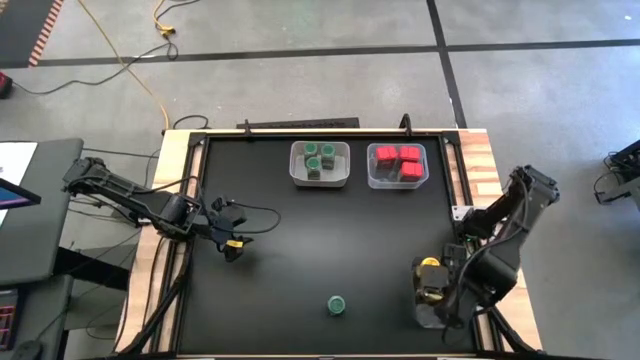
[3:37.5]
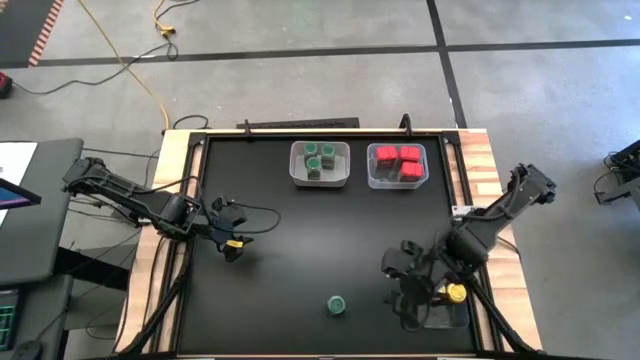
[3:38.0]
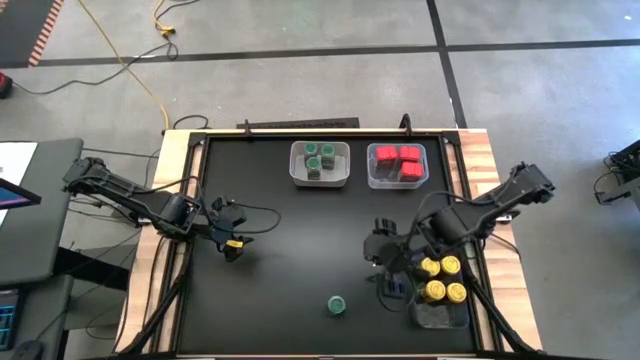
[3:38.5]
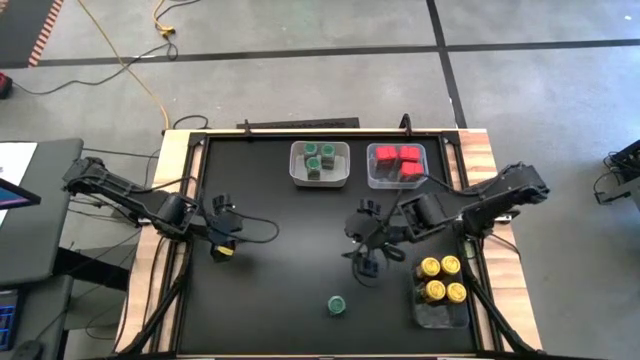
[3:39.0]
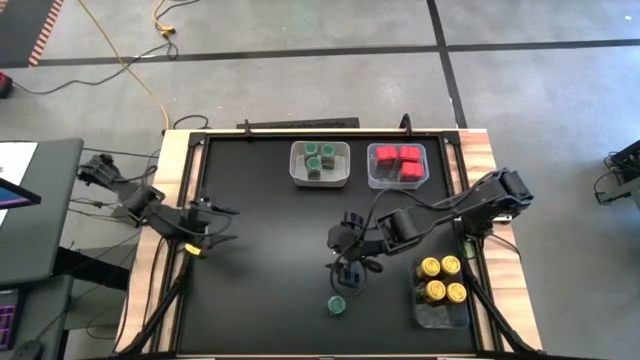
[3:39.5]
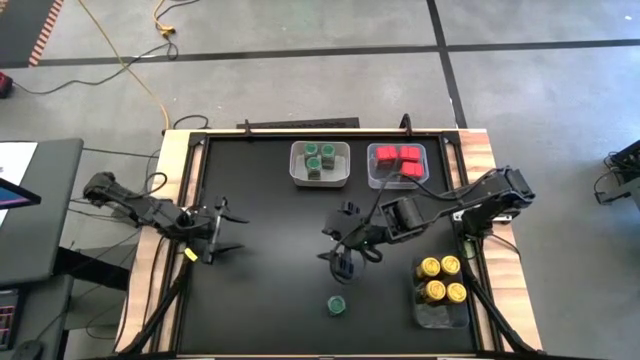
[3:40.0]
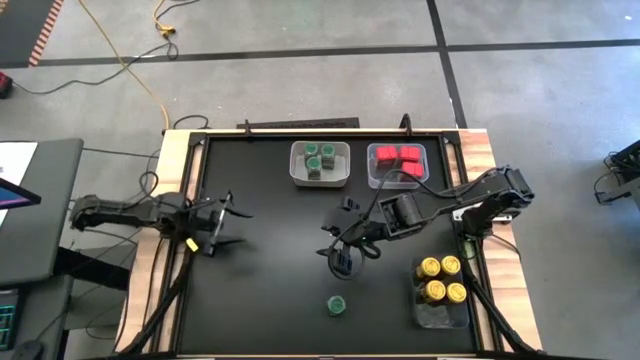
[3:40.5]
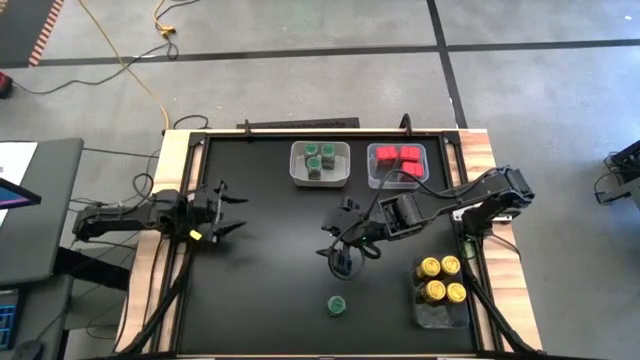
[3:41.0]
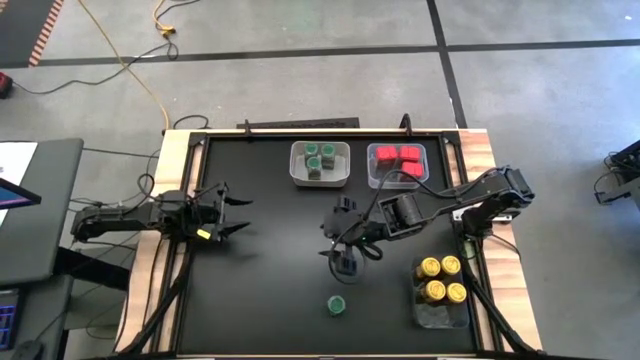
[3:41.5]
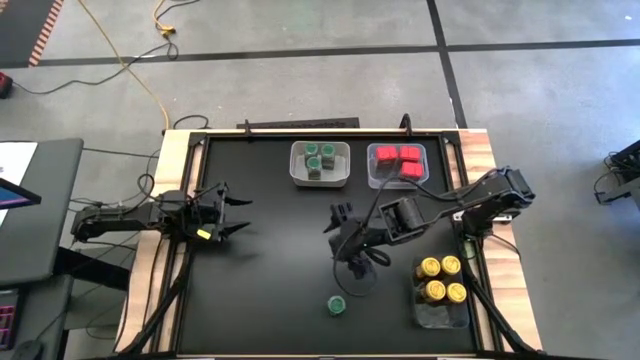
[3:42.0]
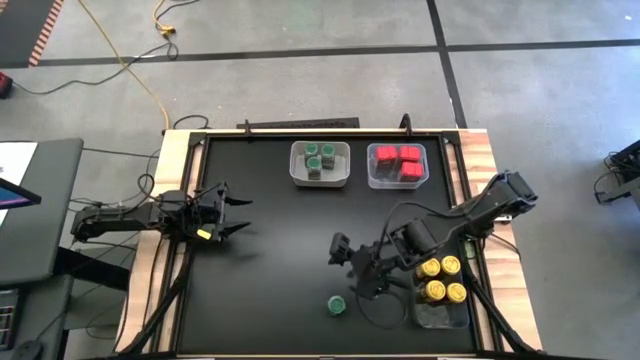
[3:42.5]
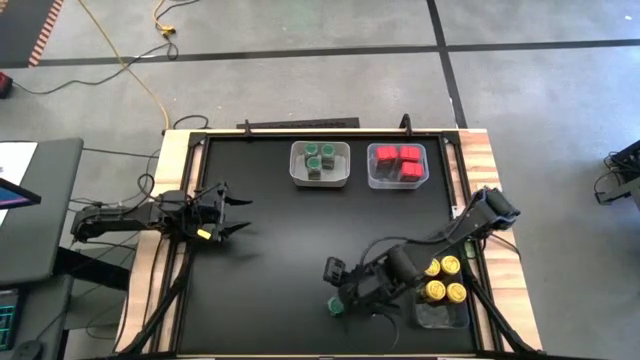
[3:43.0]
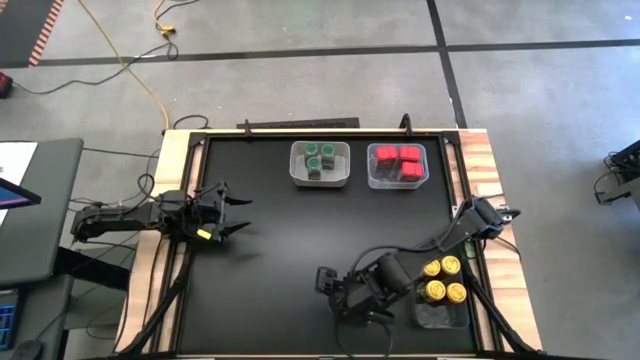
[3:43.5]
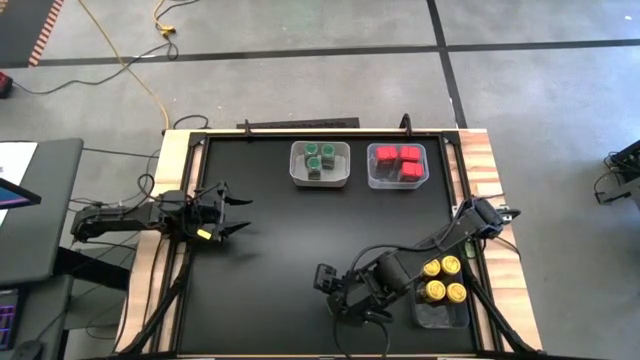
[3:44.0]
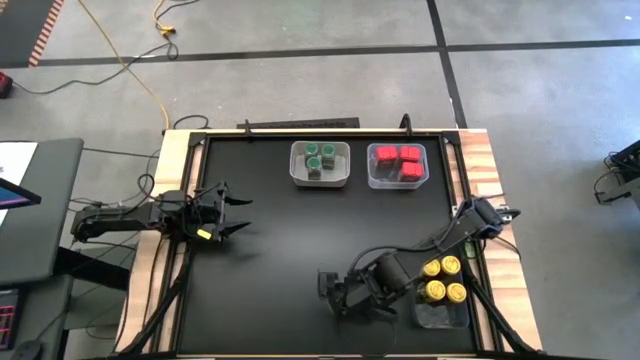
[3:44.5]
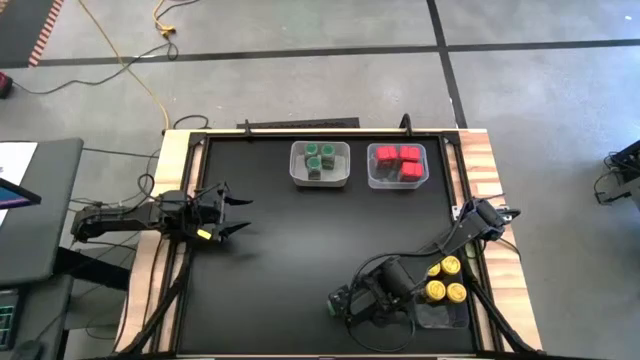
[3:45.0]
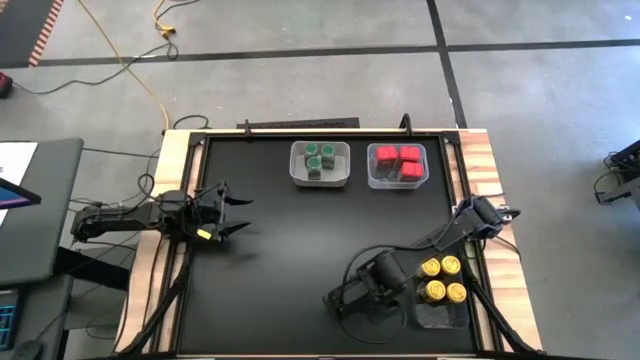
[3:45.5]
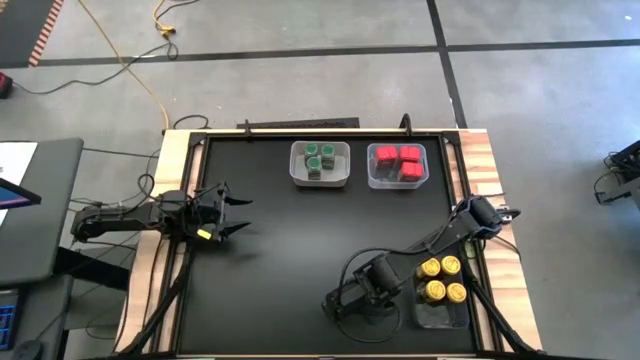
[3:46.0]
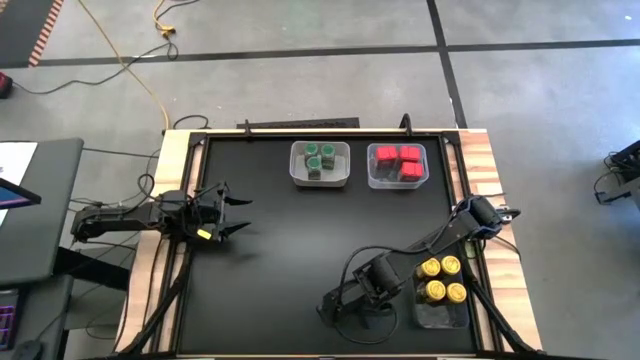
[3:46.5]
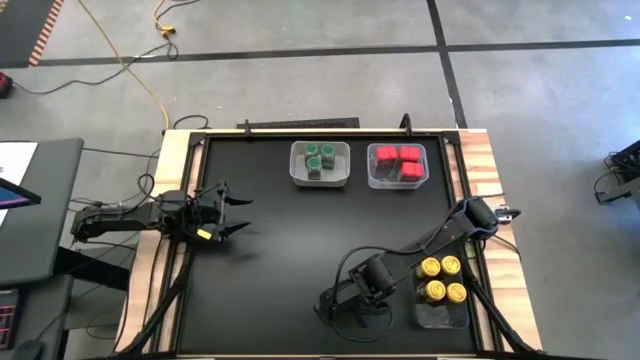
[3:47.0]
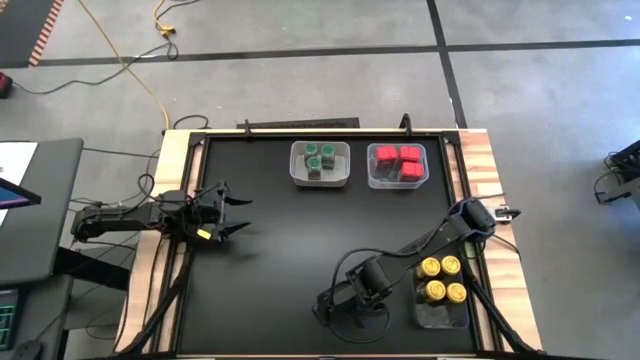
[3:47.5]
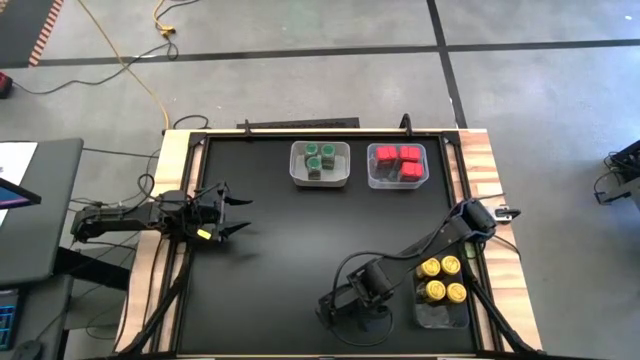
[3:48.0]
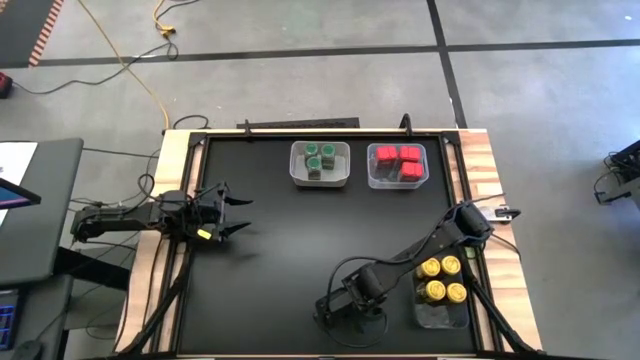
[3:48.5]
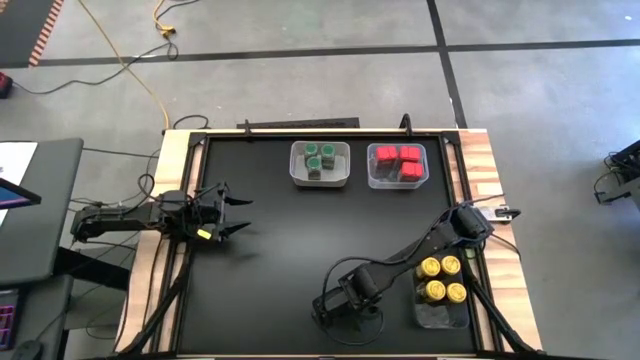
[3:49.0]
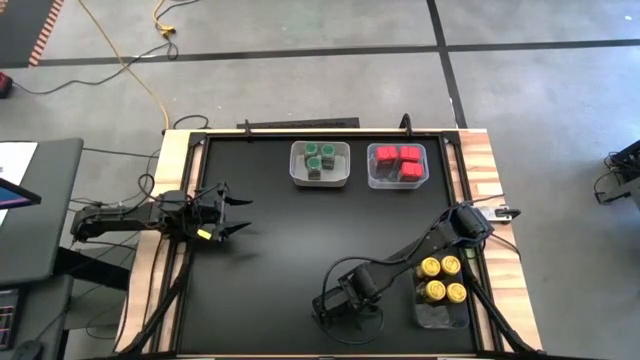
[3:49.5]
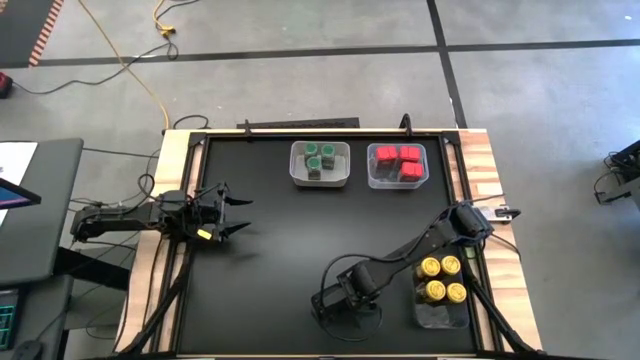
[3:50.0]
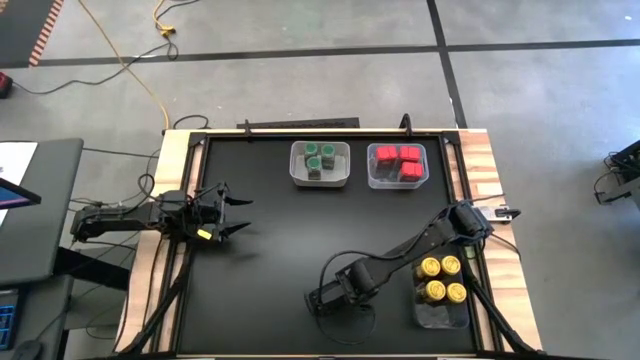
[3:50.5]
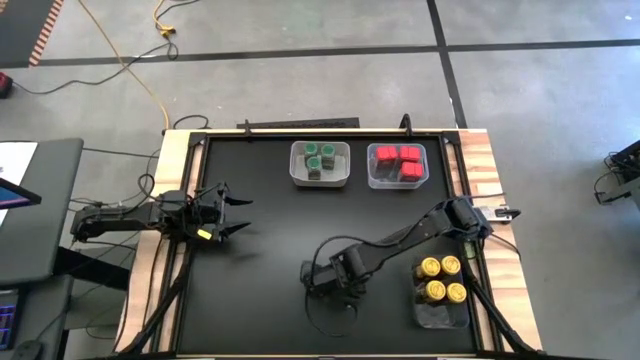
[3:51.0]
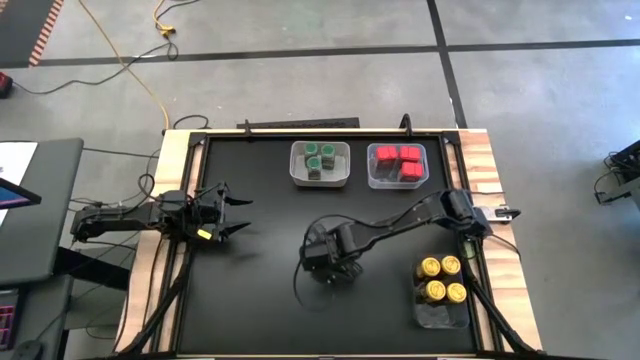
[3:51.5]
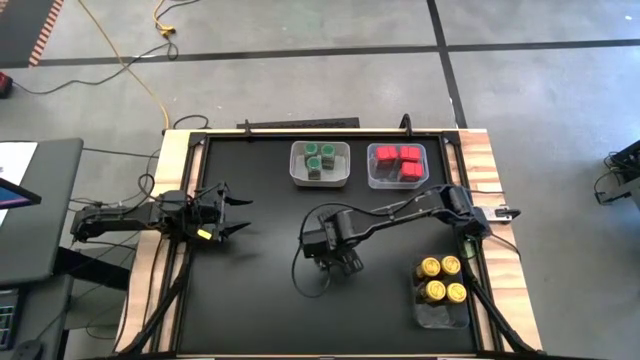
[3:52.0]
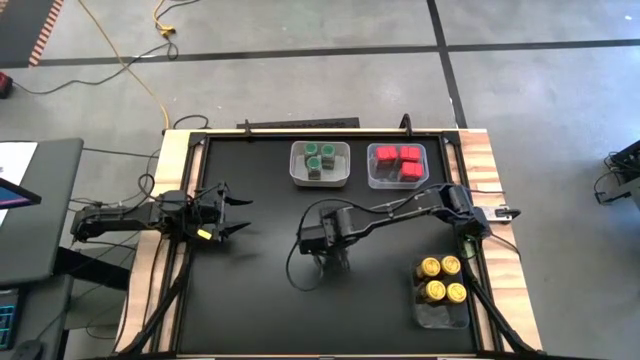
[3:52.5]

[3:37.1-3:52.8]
Task: Sort spices by type
Put the green seasoning bottle into the white bin

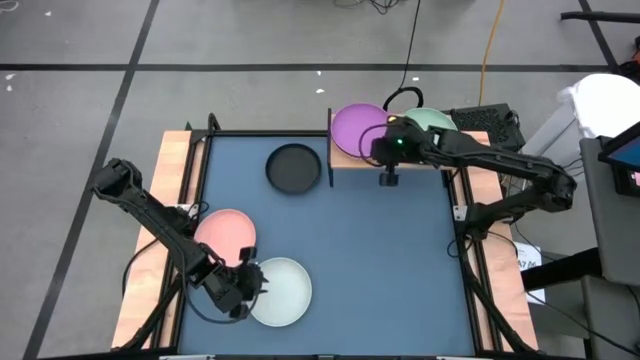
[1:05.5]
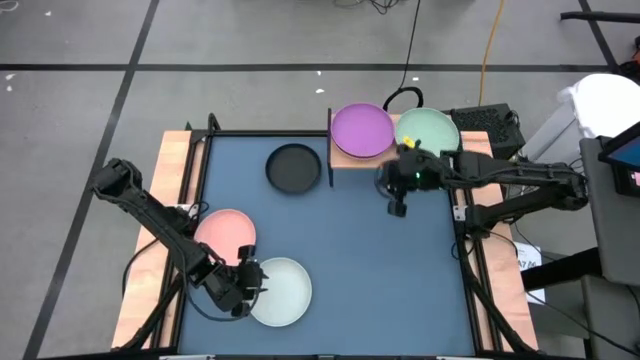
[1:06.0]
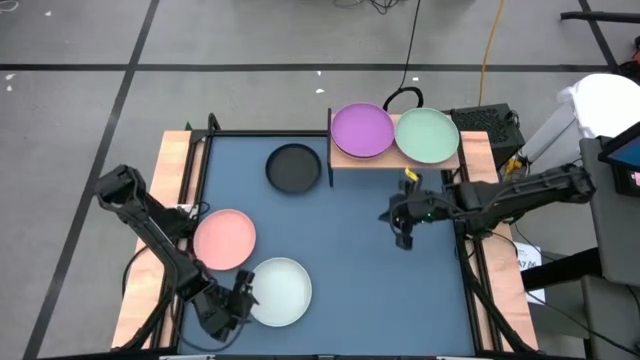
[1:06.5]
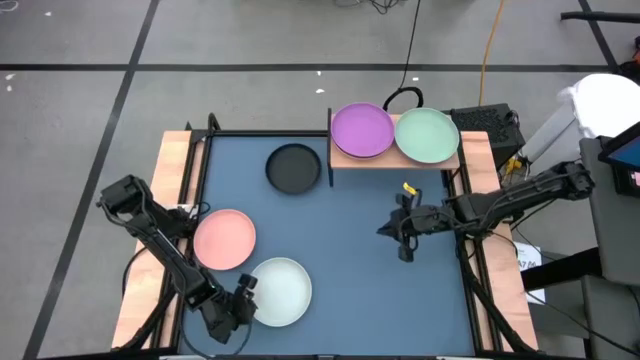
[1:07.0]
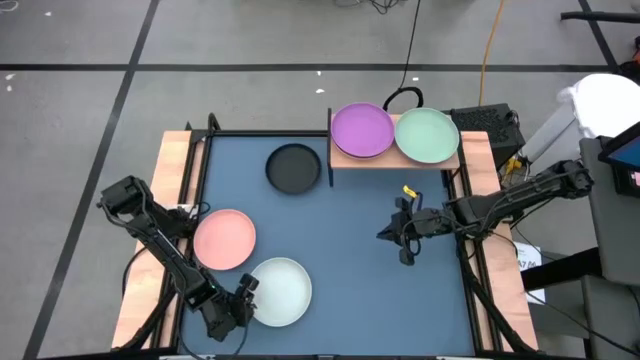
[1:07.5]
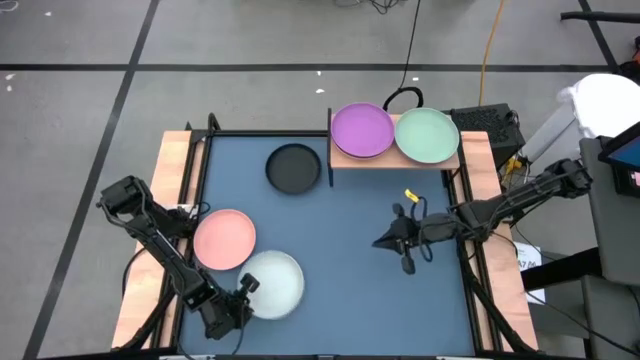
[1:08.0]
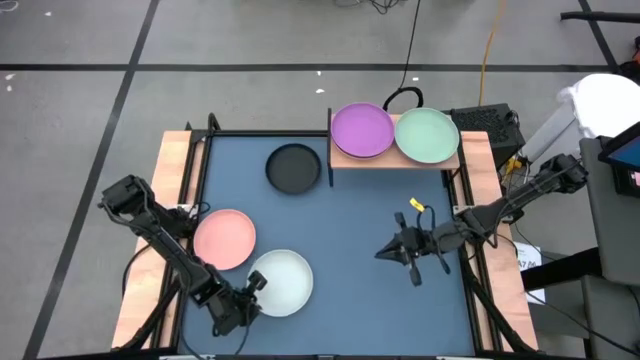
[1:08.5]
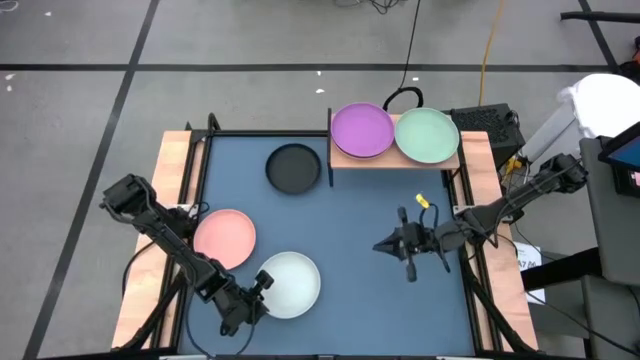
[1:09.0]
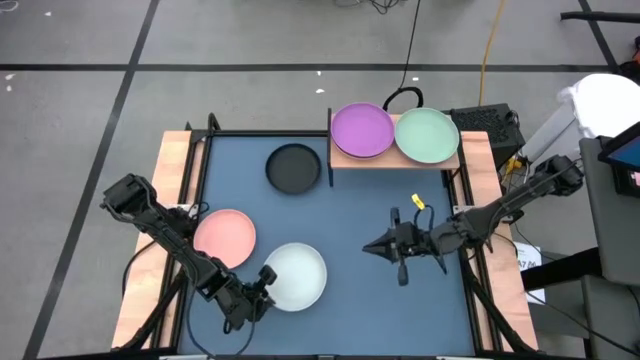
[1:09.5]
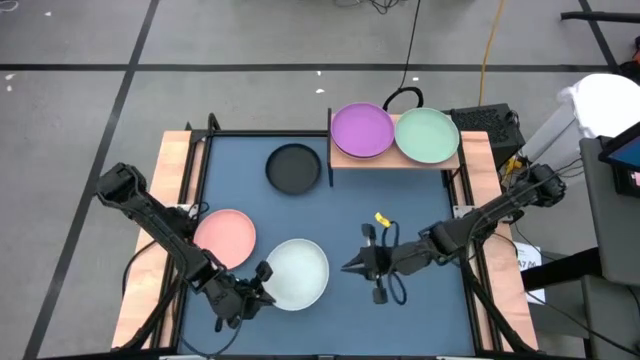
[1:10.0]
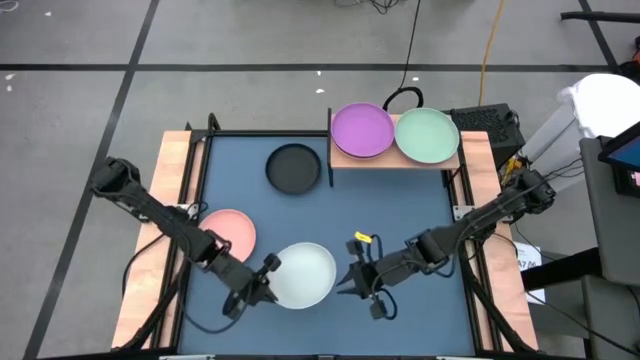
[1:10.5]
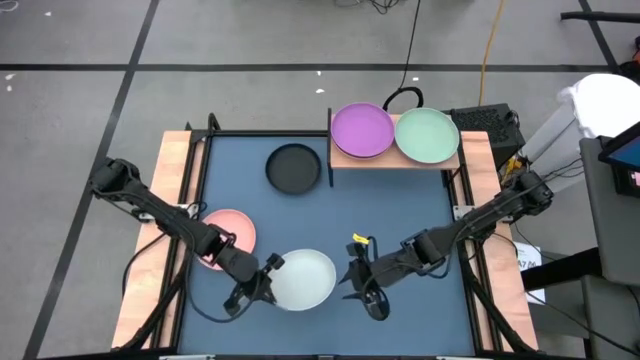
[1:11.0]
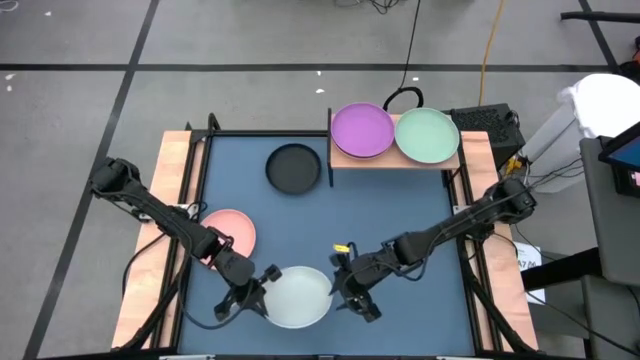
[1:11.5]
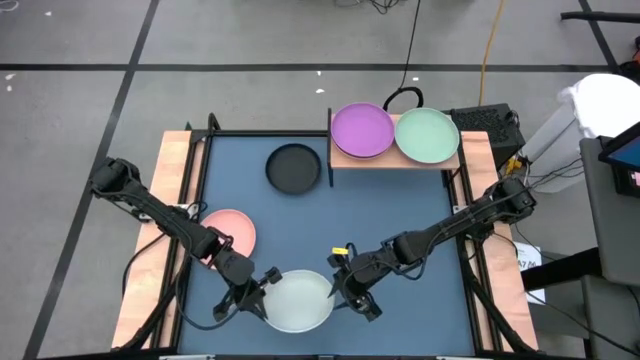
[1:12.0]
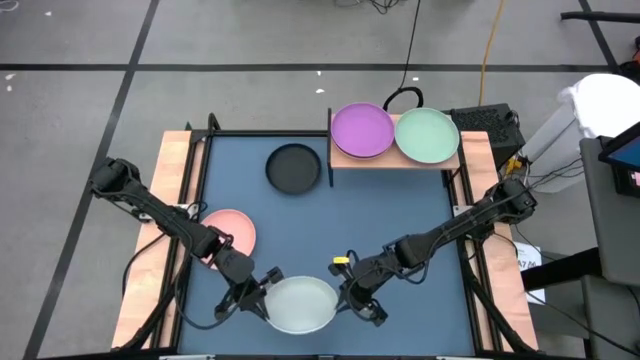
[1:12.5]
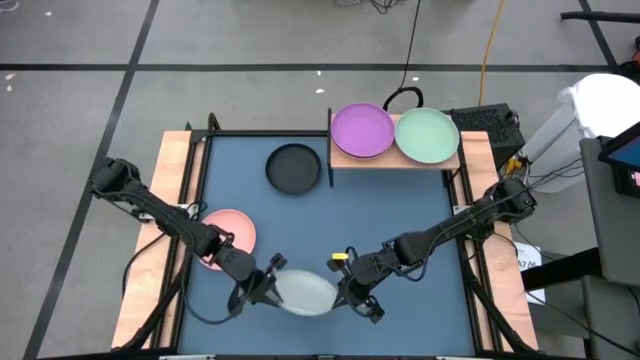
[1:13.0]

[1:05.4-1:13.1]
Task: Place and stack plates onto a shelf
Stack the gray plate on top of the light green plate on the shelf
